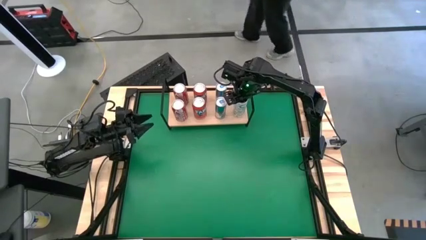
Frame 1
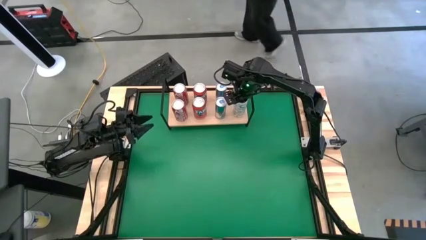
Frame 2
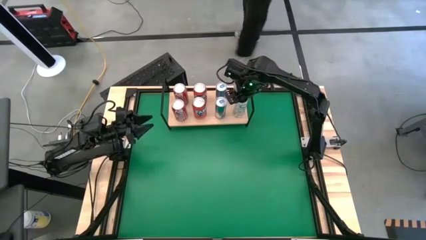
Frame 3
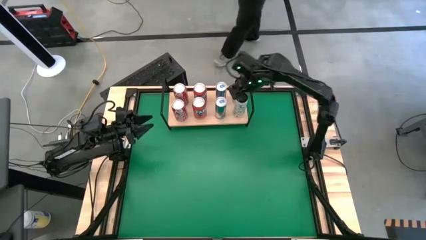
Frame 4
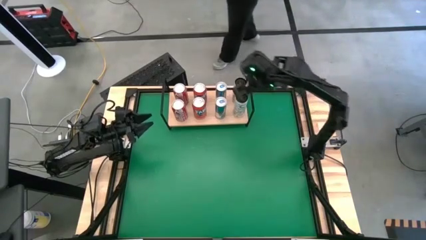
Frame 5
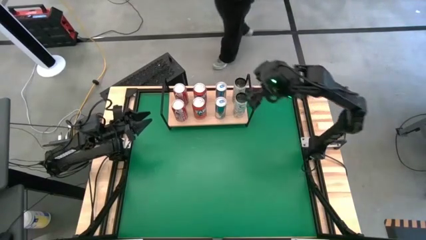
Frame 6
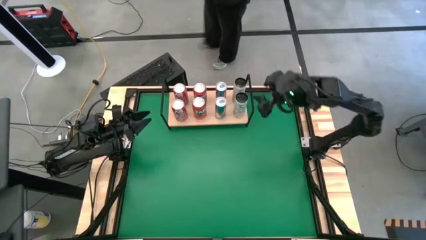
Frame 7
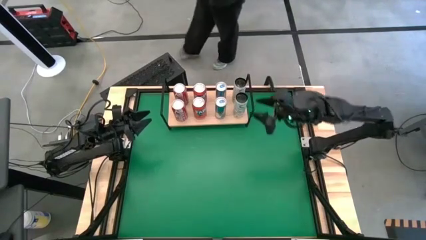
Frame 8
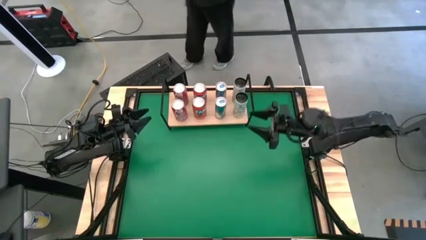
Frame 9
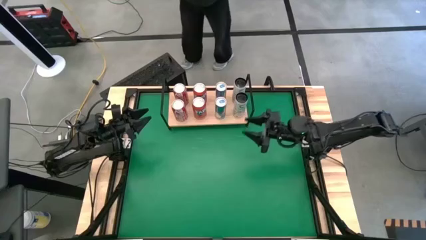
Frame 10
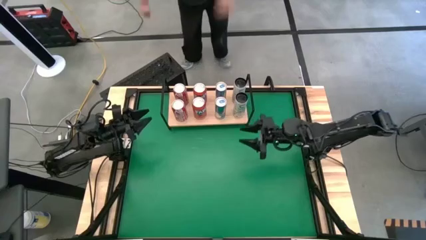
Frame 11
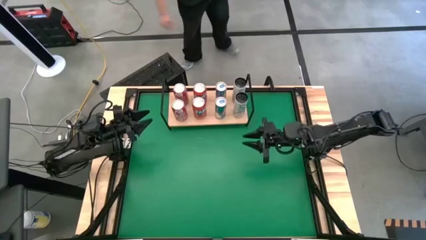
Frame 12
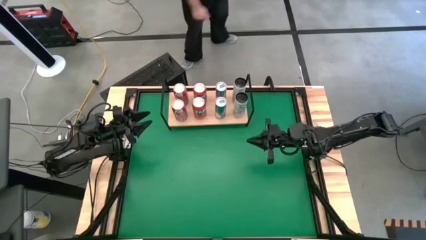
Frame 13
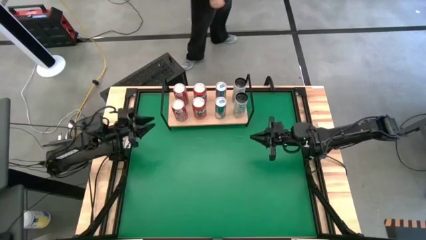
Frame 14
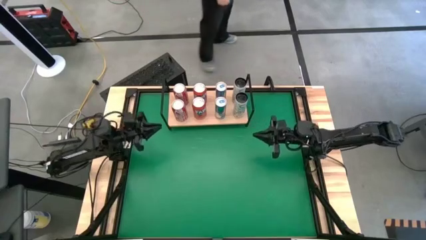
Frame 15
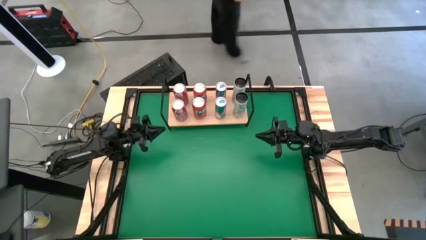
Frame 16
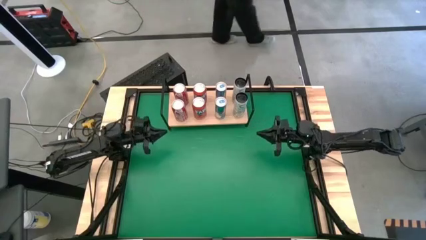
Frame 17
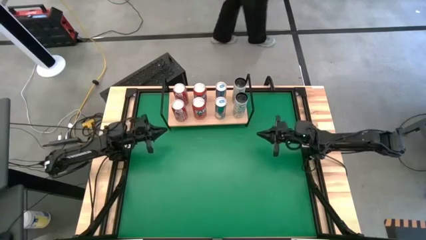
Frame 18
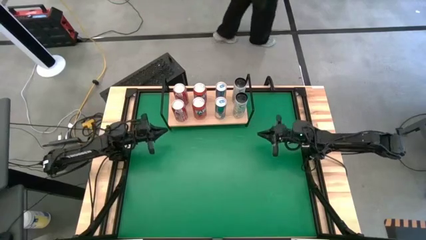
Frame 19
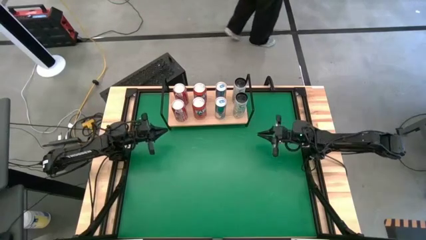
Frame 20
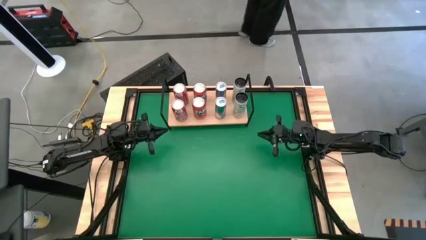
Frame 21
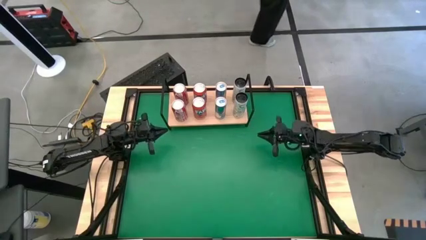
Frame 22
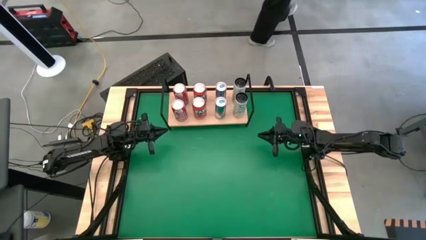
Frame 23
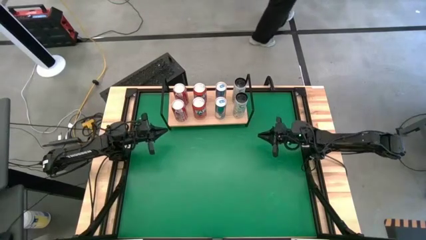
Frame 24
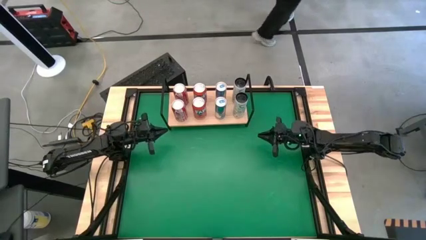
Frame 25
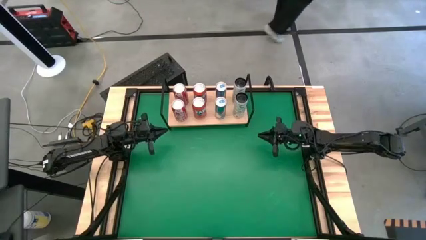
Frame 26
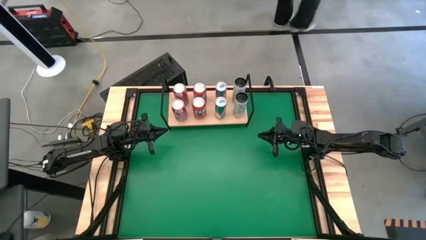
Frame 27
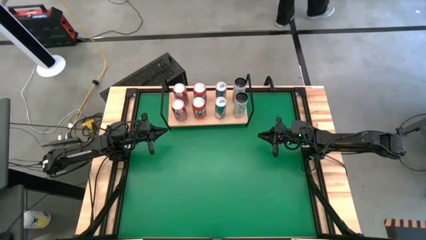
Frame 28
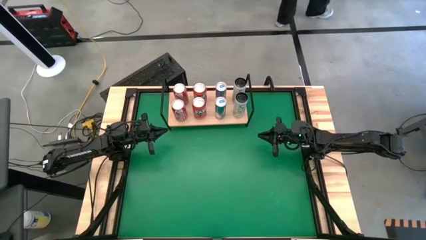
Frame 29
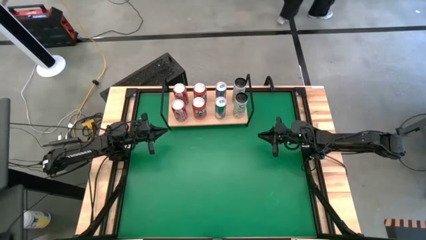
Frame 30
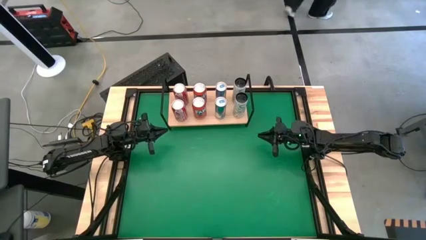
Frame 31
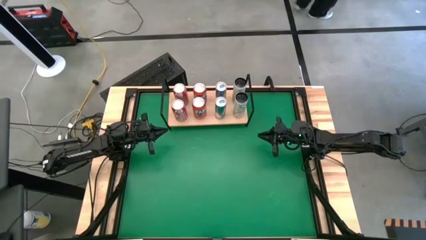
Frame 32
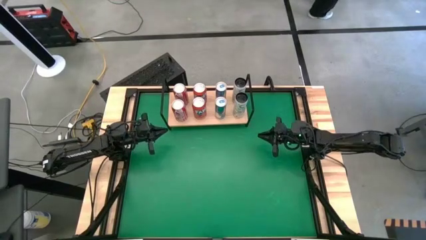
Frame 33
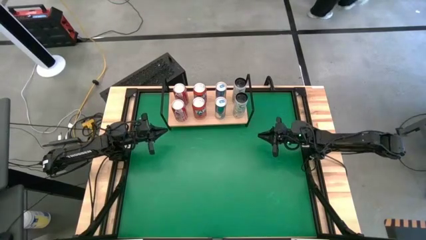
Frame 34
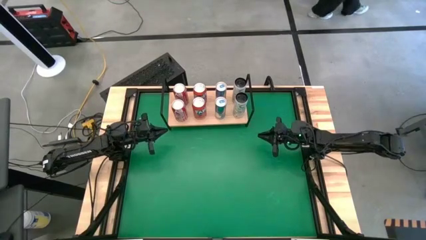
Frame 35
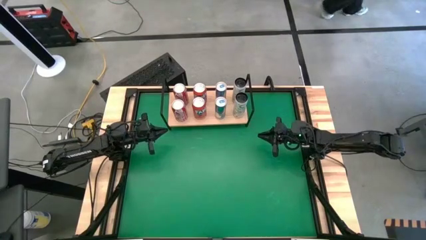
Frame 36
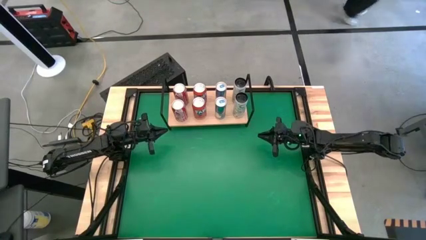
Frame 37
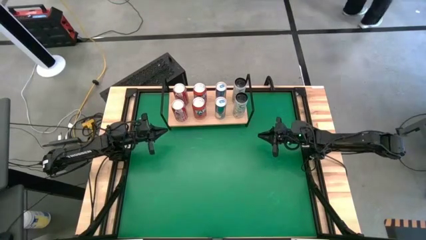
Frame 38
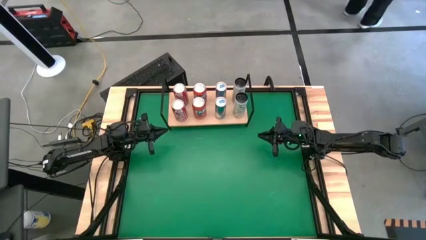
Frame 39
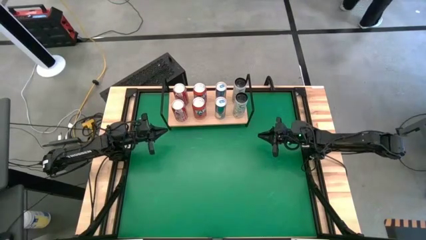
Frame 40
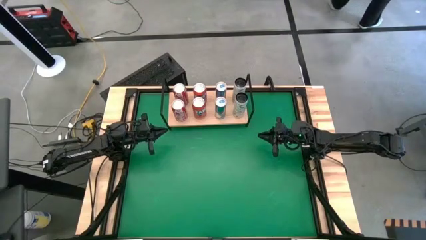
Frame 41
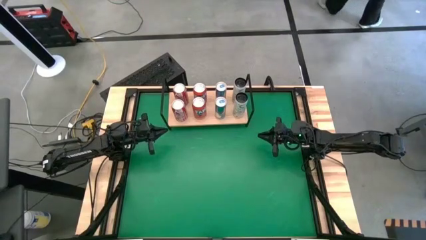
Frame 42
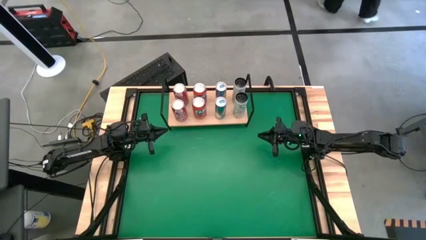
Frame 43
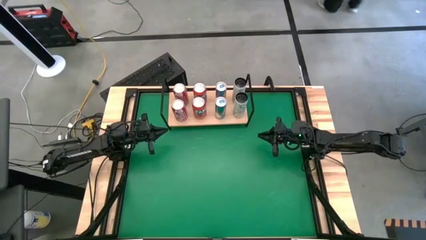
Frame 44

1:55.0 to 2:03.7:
Task: Place canned beverage on shelf
Return to Home Position

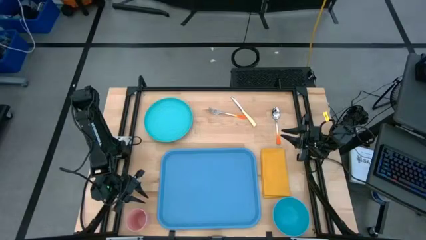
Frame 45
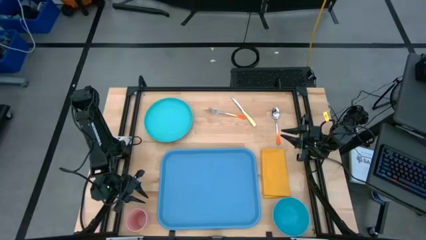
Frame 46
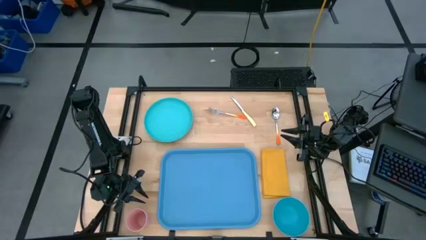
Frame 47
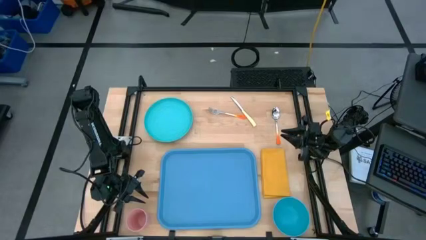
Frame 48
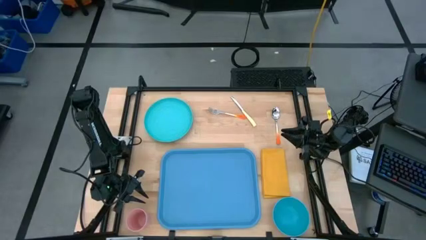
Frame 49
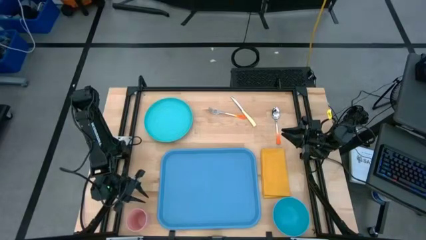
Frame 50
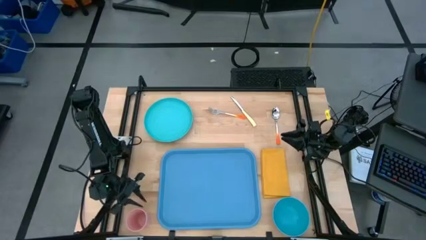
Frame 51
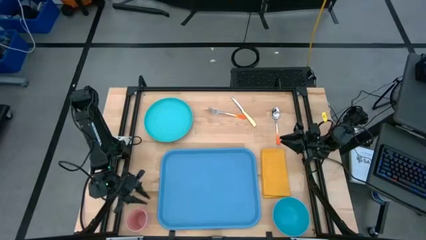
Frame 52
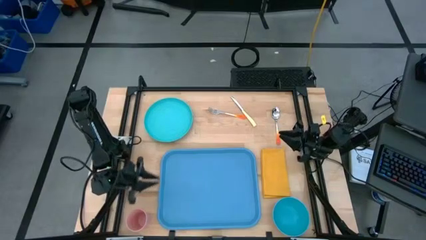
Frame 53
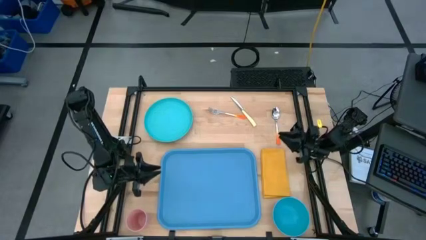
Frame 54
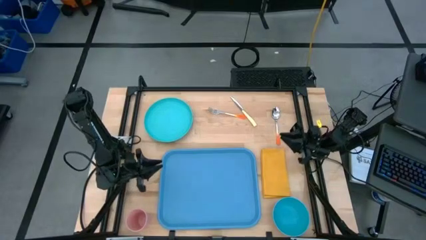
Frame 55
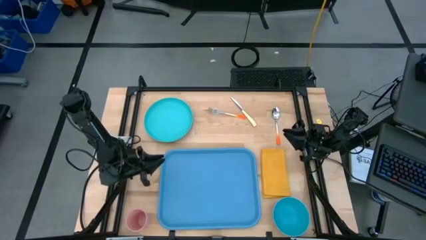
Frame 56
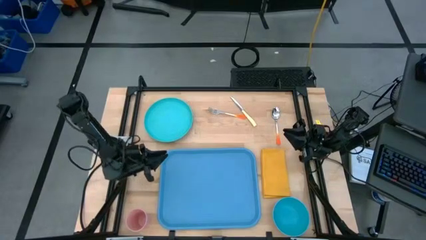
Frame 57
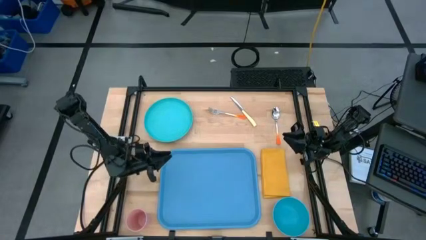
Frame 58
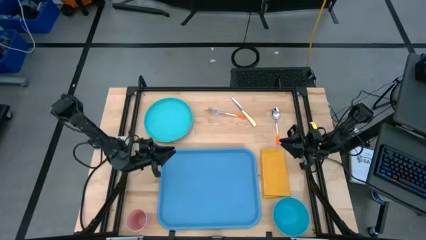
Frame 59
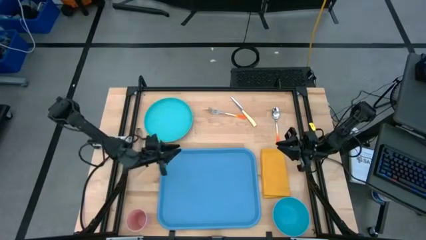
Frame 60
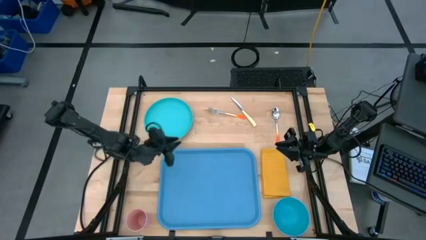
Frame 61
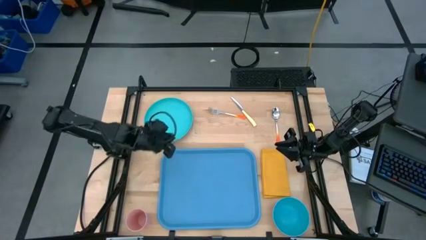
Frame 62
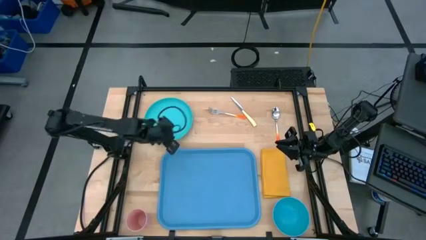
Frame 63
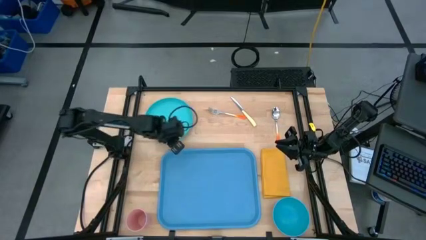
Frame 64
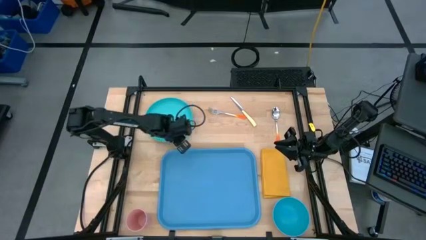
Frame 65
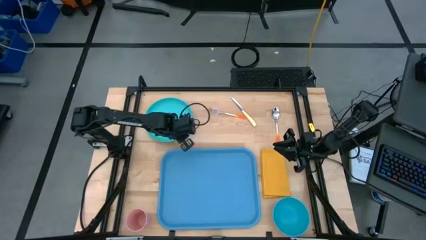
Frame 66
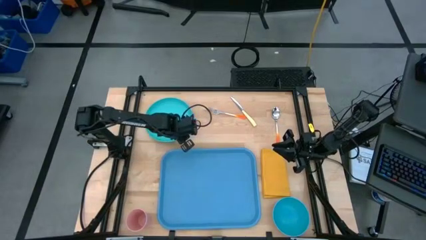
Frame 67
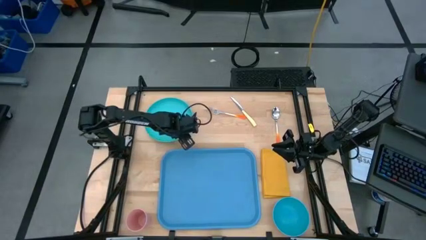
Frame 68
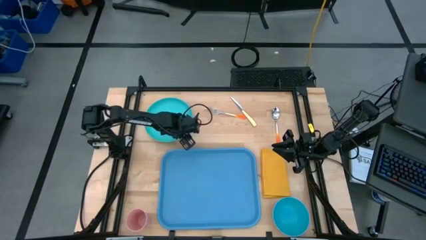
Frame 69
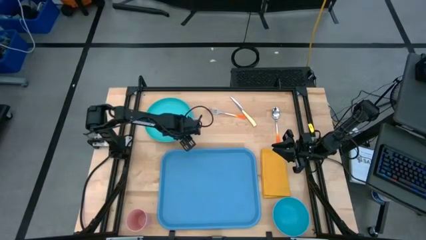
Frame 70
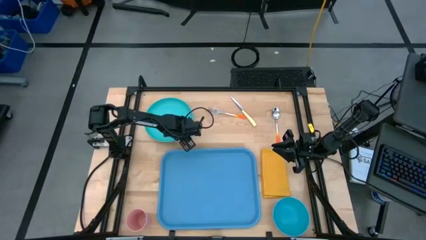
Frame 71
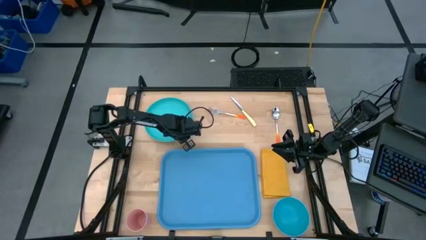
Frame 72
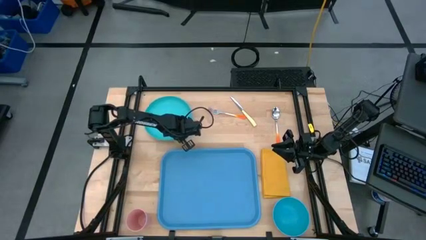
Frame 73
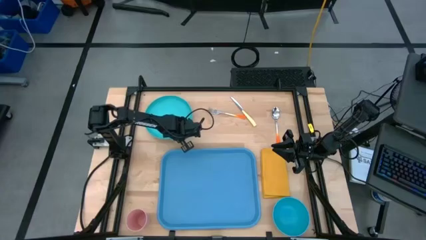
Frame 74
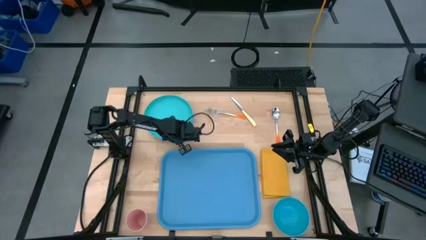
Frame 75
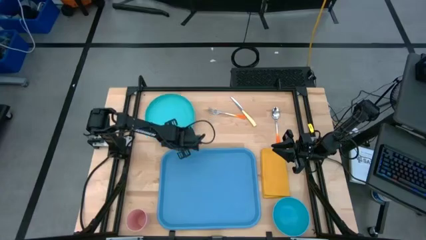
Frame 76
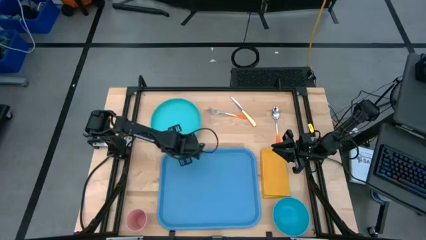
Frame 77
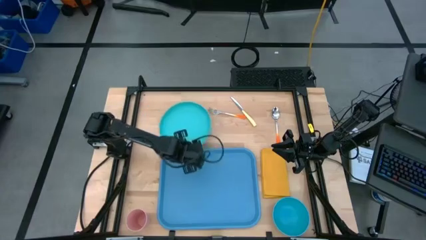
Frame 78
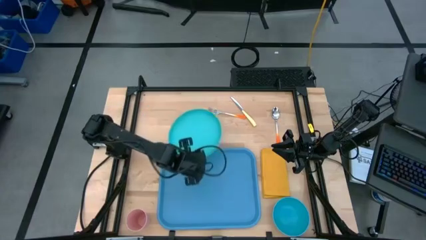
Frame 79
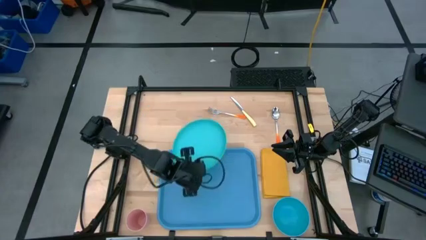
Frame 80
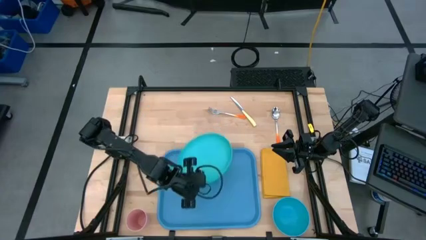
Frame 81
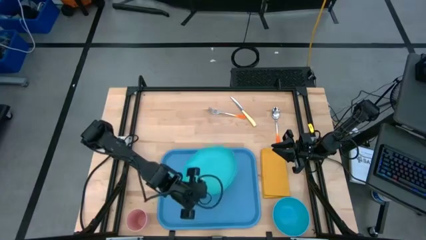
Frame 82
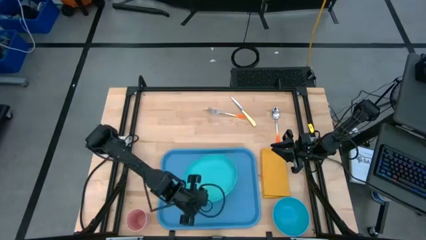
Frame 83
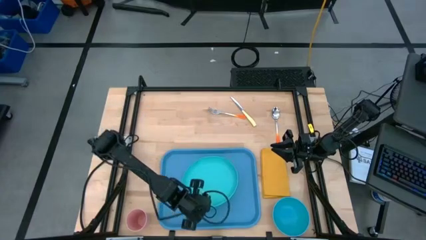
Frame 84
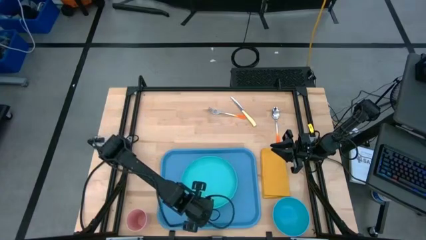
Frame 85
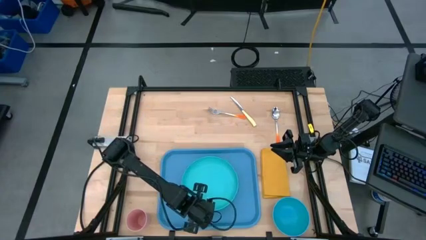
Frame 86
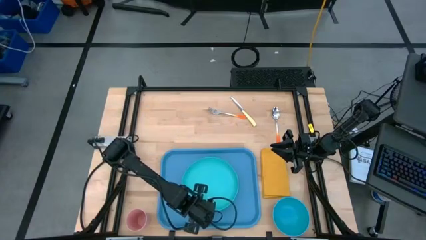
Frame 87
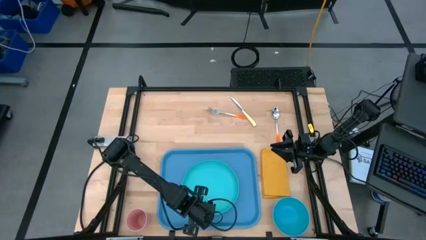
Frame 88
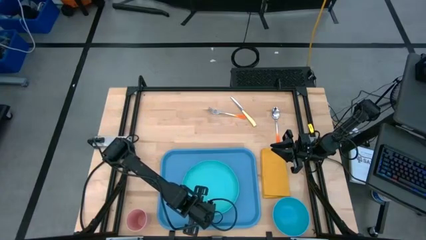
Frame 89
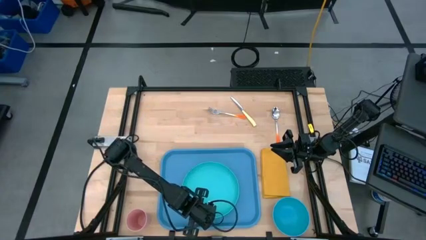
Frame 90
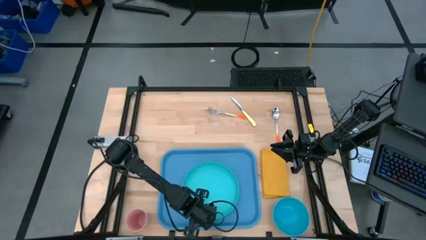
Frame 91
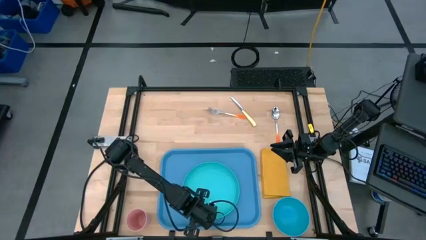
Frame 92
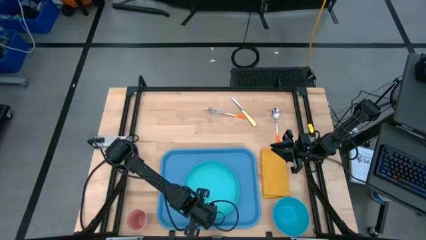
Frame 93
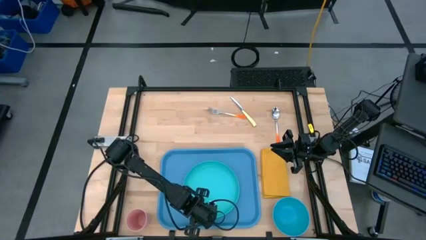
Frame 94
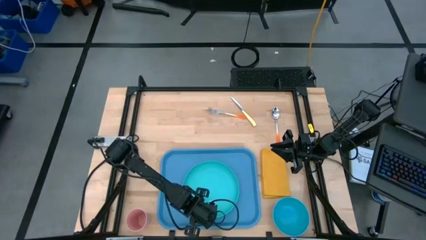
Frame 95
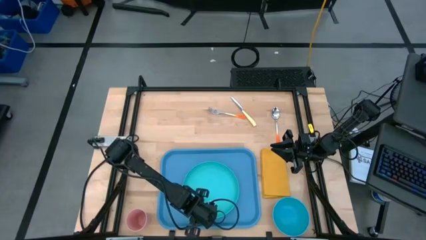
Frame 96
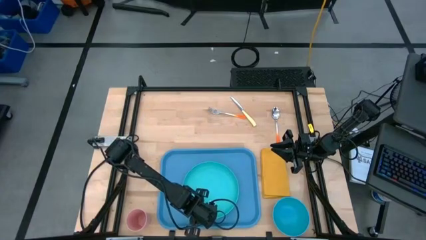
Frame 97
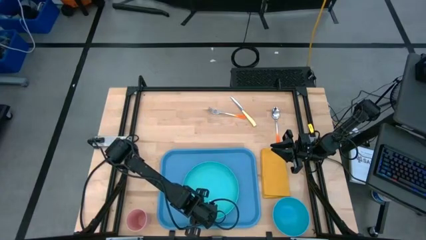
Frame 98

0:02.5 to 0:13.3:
Task: Set up tray
Put the green plate on the blue tray
